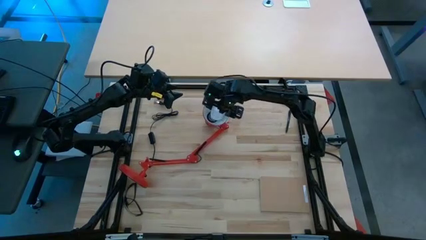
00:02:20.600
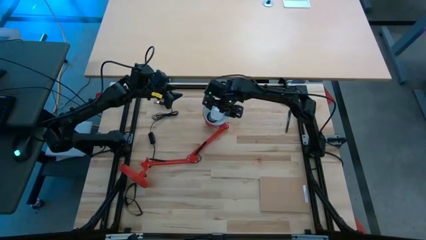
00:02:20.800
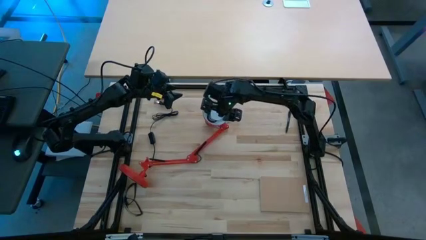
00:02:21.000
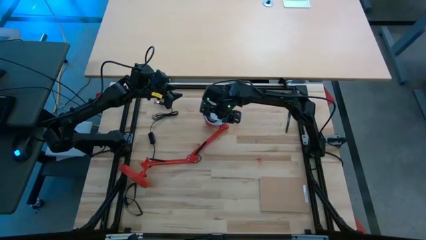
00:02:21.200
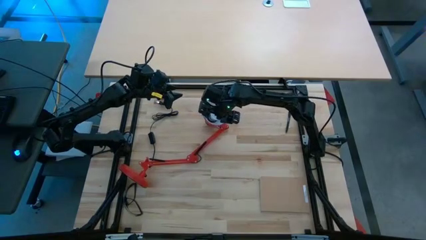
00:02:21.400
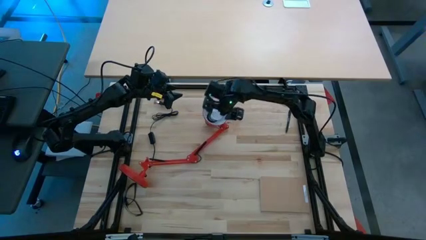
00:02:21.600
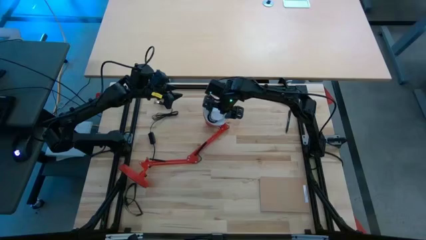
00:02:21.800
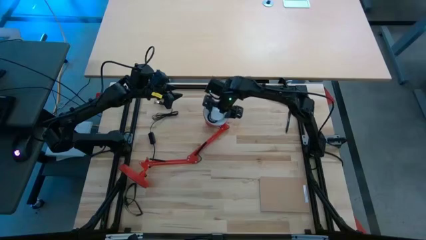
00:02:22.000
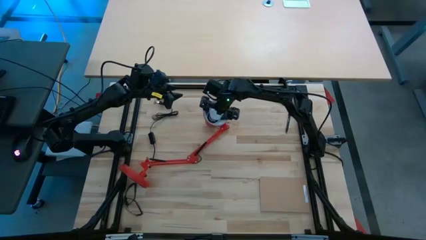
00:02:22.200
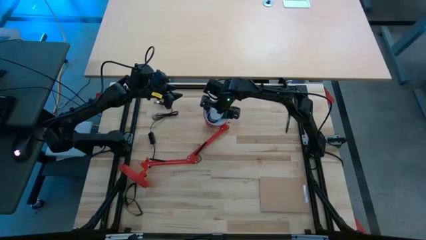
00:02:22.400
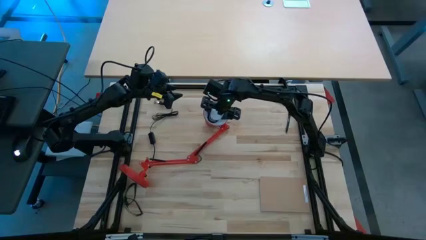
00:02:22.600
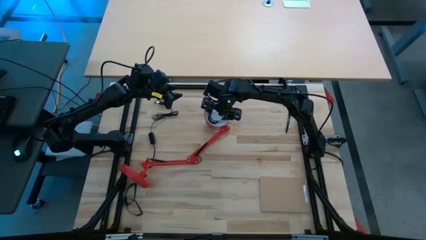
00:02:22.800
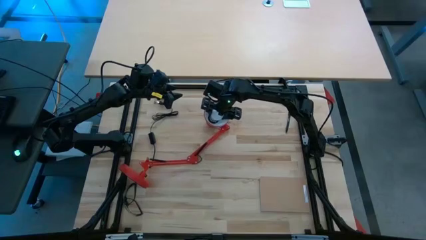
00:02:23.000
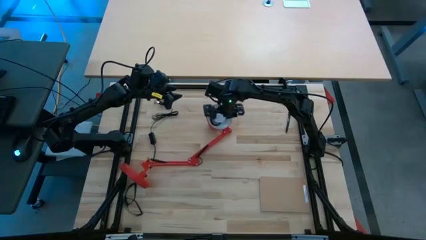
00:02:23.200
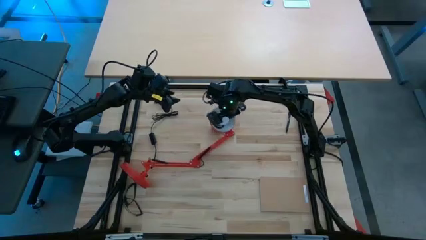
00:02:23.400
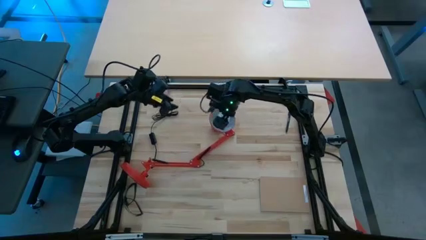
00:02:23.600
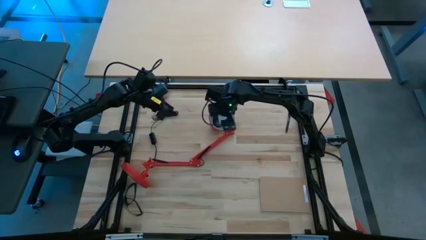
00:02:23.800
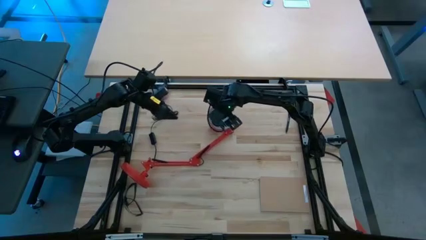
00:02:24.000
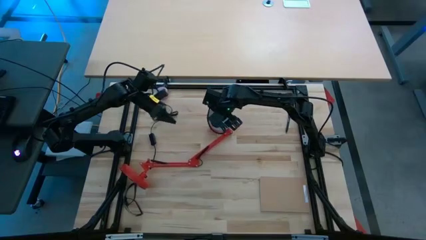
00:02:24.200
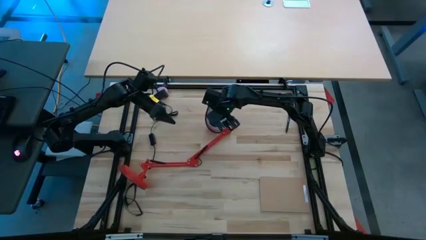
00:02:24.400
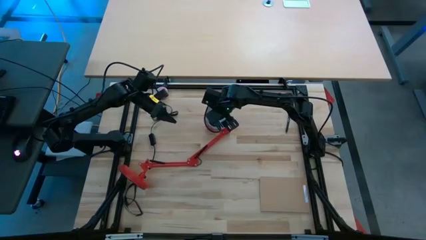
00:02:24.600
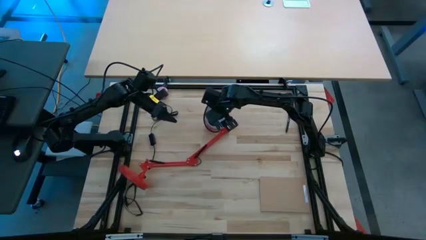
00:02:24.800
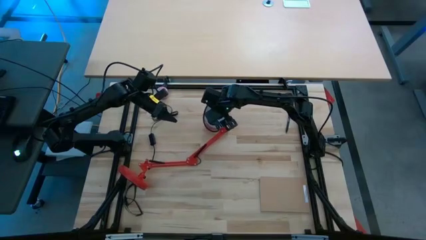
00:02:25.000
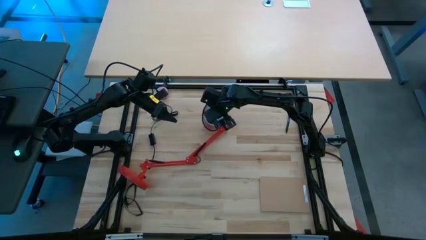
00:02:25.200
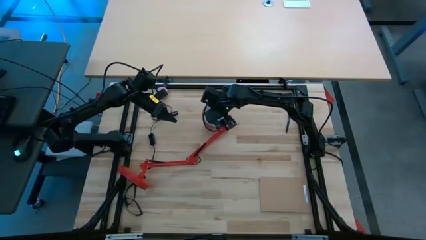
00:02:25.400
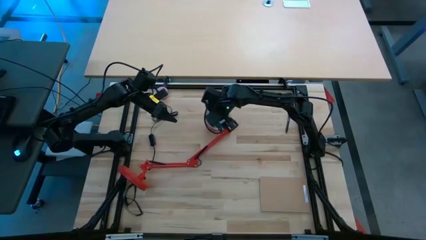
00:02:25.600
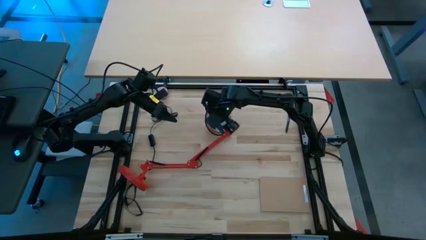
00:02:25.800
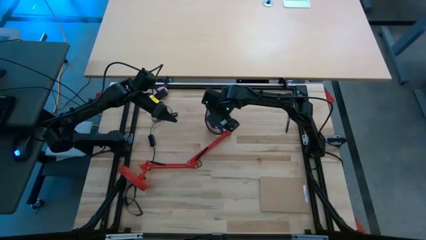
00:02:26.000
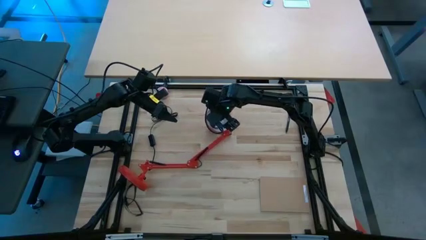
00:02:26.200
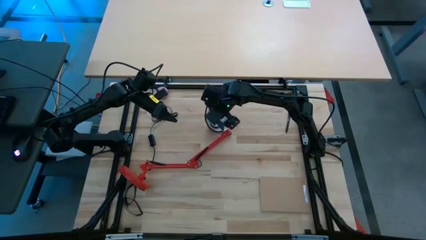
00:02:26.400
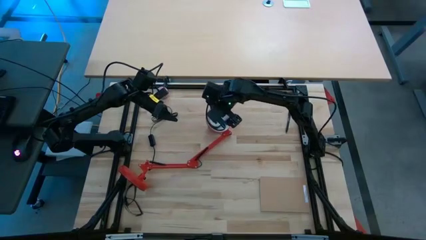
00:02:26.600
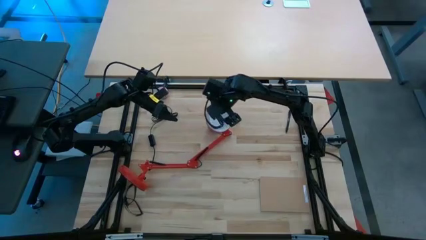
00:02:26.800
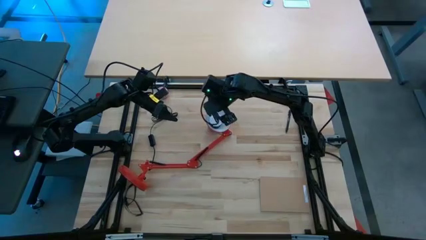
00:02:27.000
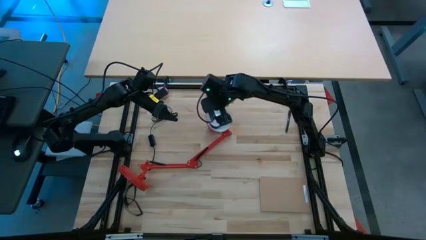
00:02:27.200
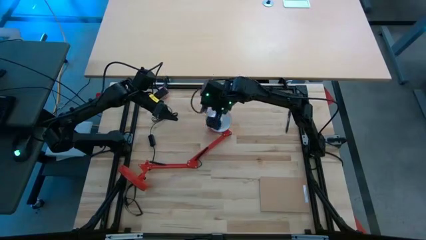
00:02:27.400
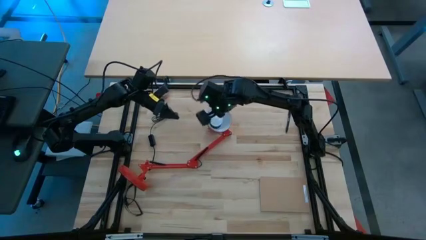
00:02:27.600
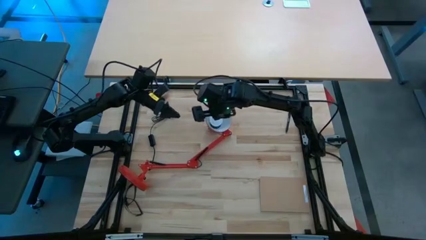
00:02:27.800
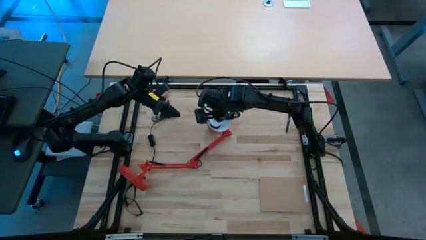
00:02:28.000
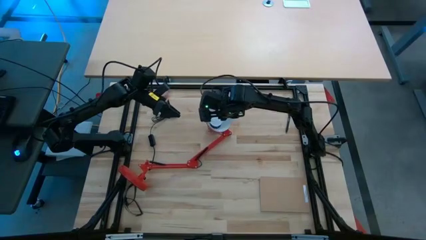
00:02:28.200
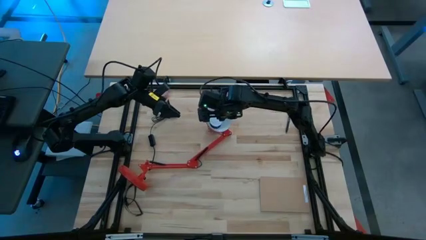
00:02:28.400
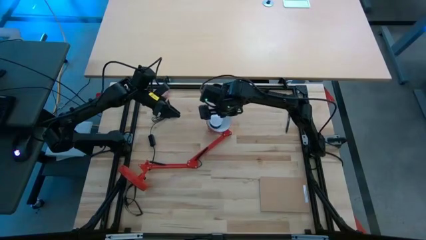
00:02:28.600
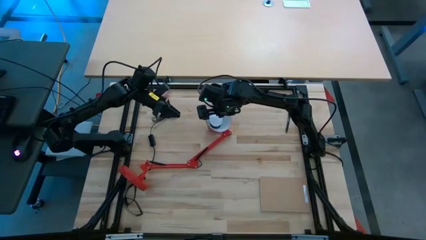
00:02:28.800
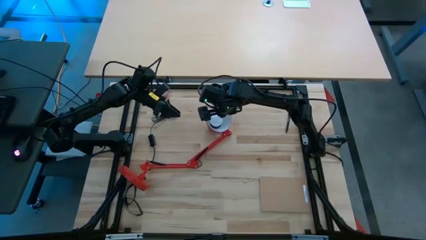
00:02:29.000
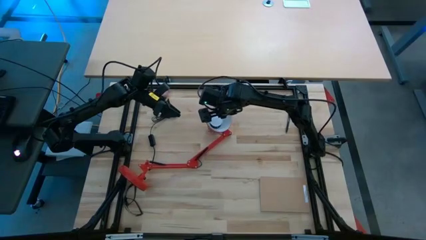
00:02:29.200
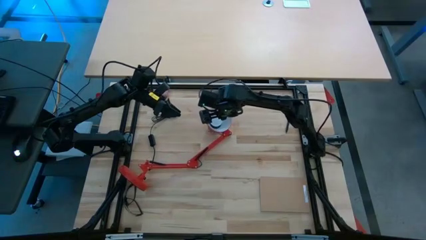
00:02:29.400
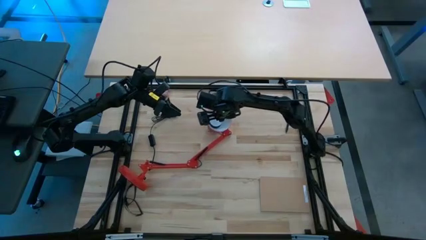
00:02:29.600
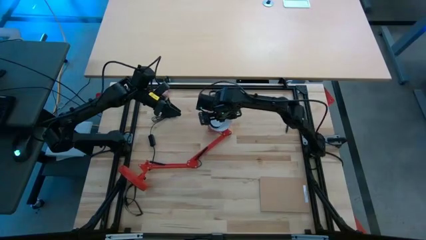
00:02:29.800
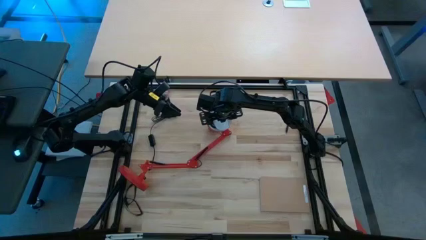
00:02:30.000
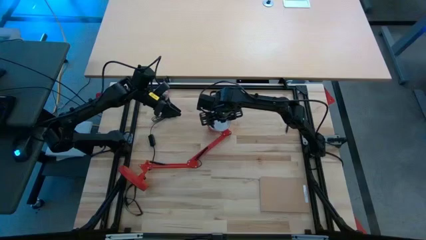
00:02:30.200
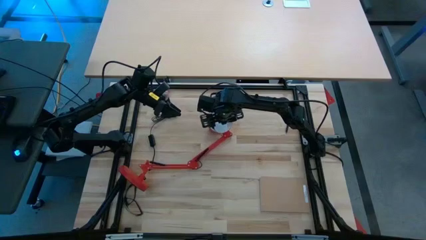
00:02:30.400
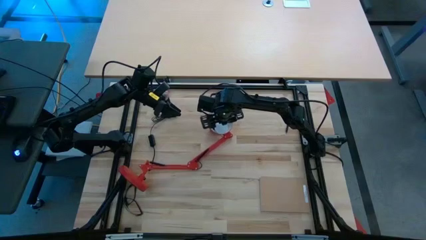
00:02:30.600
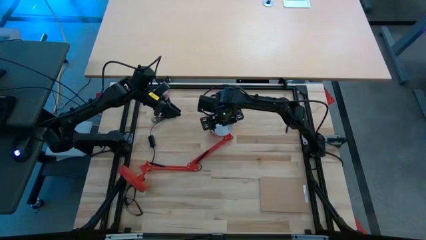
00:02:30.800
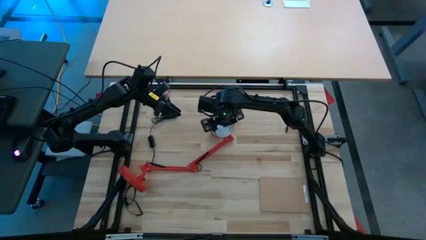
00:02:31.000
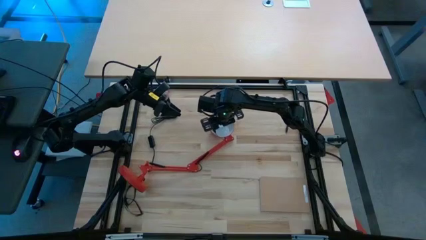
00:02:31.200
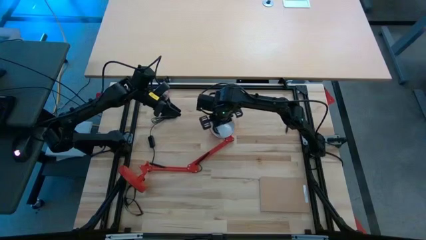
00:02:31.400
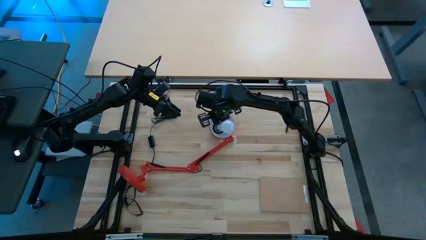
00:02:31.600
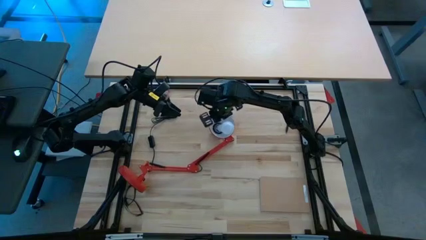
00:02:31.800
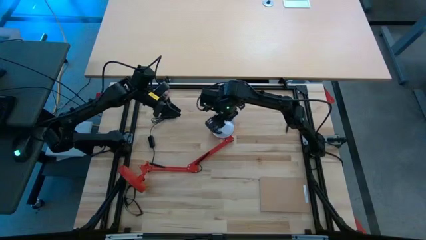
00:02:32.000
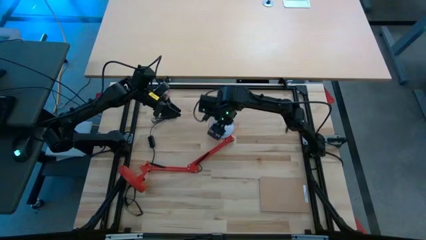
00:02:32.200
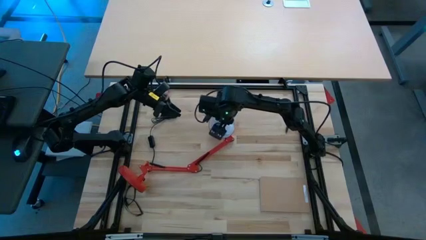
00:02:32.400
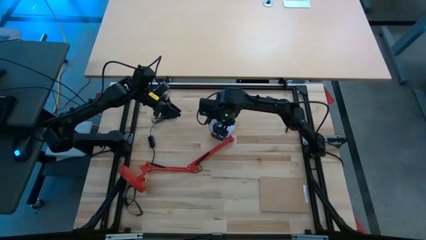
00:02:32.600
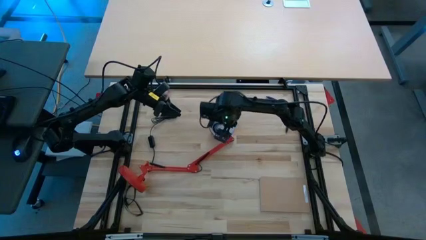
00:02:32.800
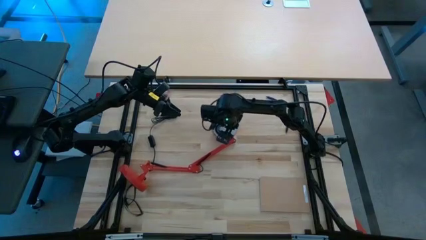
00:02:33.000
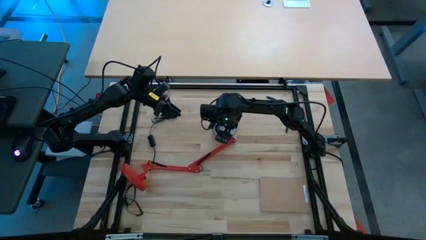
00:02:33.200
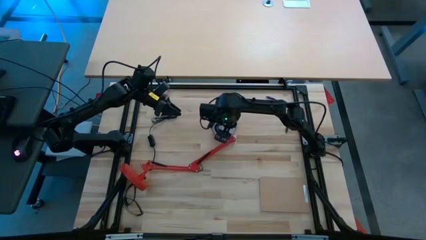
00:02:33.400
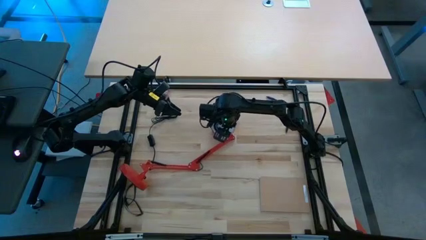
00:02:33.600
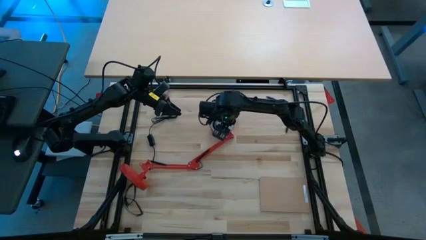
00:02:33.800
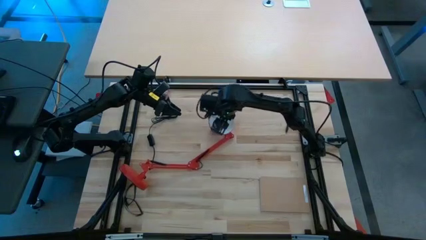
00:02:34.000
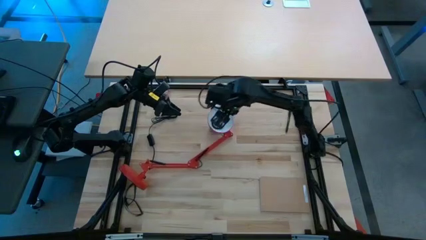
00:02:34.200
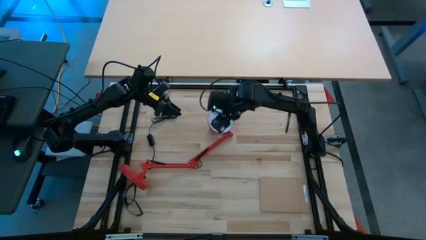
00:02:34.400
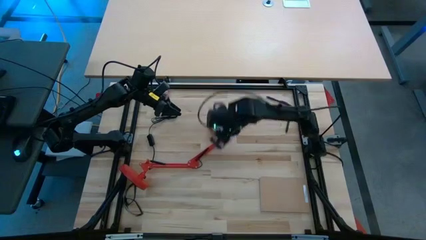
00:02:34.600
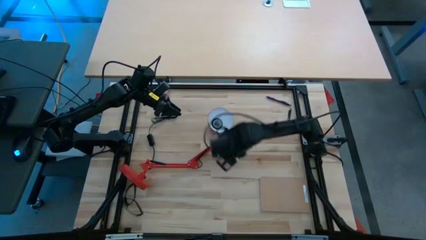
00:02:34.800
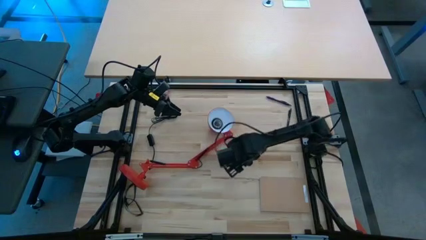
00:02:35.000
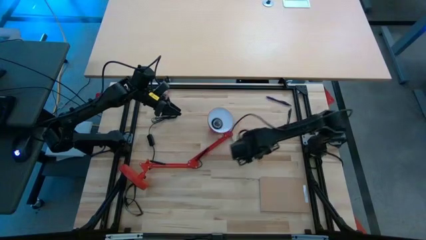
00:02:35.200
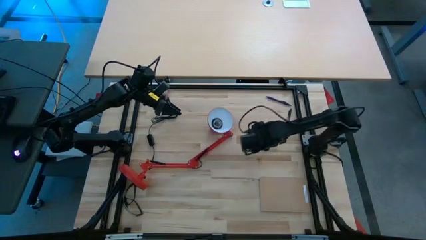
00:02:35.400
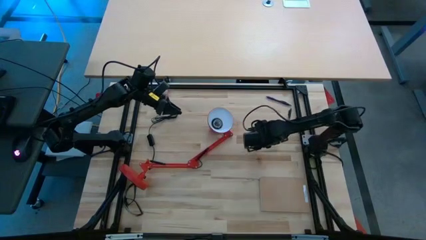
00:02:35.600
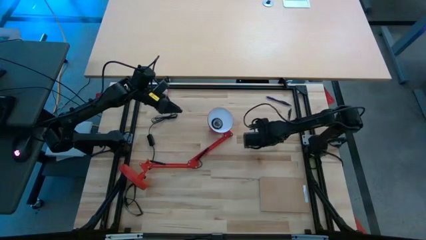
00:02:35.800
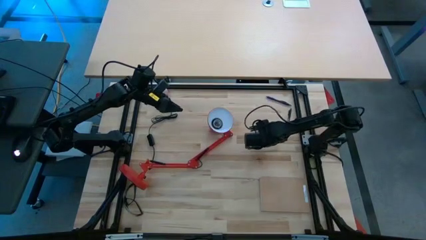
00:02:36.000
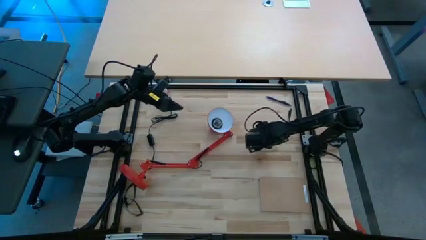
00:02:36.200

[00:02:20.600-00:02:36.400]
Task: Screw lightbulb
Remove the lightbulb from the desk lamp
